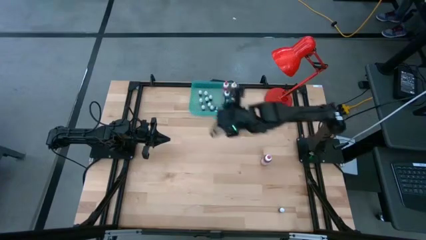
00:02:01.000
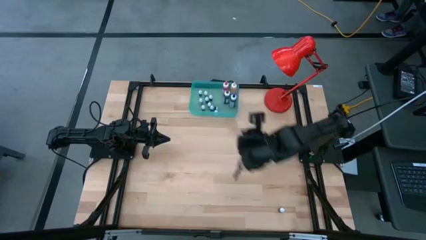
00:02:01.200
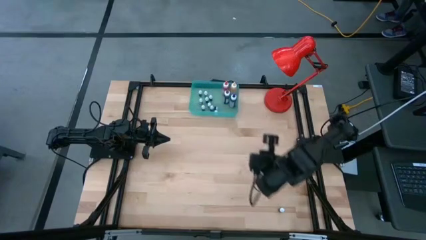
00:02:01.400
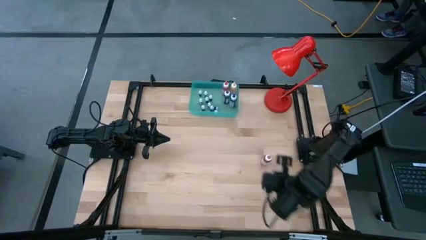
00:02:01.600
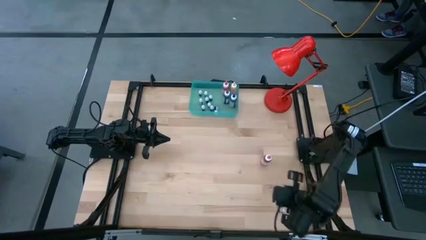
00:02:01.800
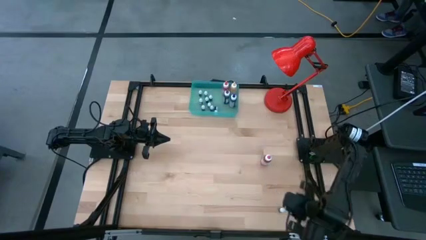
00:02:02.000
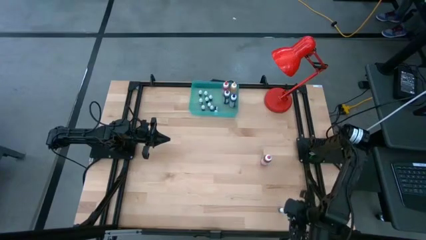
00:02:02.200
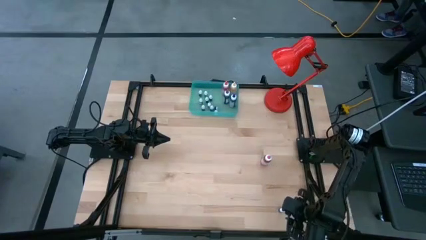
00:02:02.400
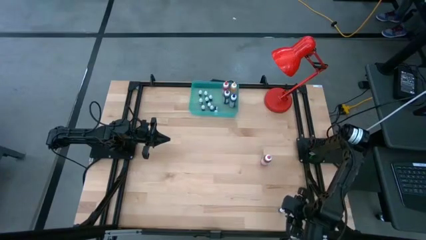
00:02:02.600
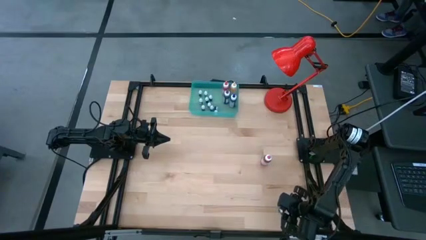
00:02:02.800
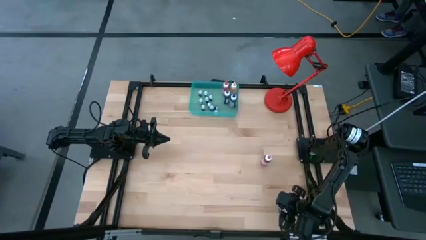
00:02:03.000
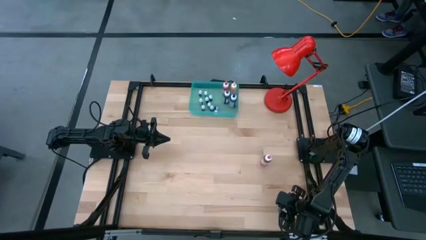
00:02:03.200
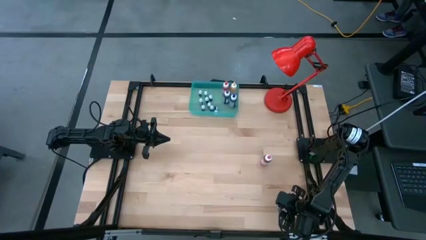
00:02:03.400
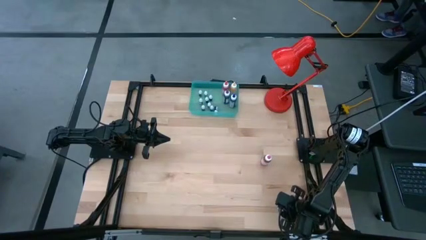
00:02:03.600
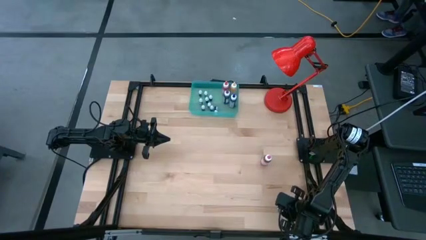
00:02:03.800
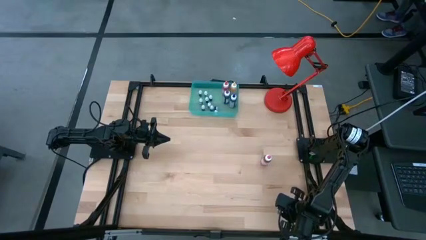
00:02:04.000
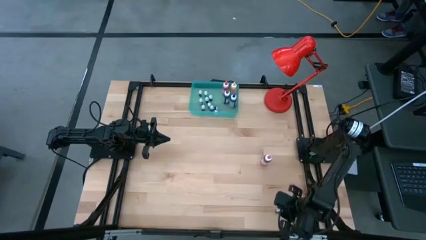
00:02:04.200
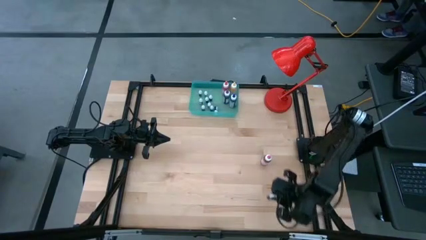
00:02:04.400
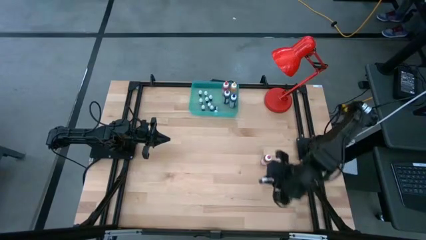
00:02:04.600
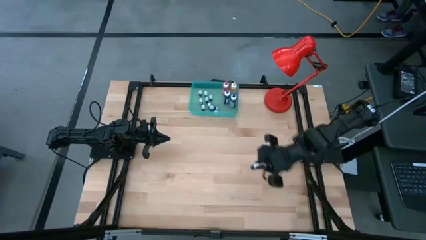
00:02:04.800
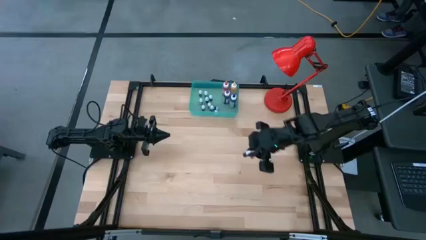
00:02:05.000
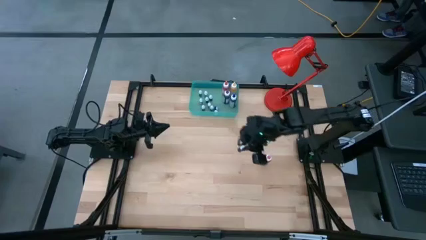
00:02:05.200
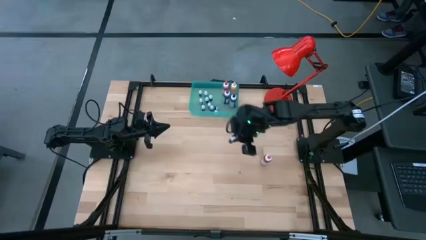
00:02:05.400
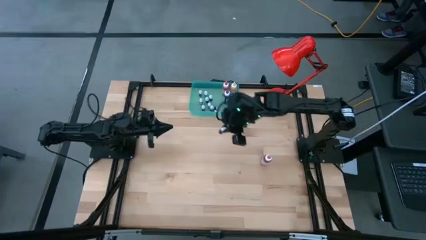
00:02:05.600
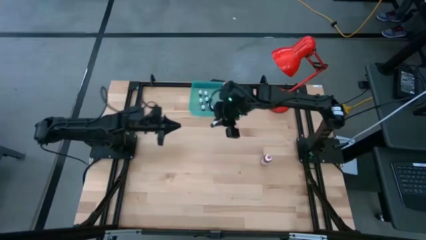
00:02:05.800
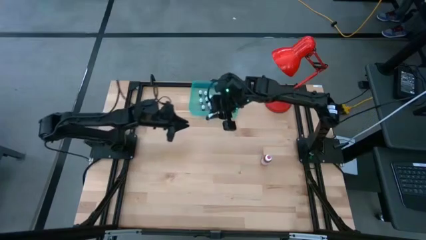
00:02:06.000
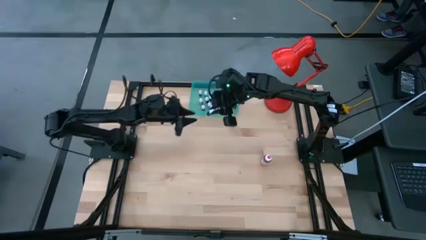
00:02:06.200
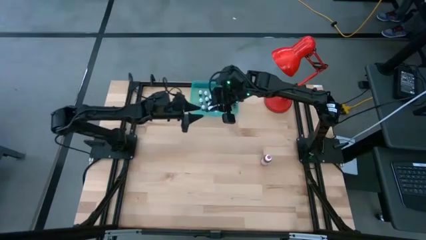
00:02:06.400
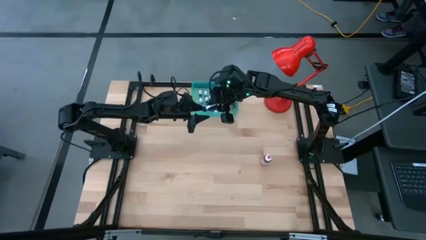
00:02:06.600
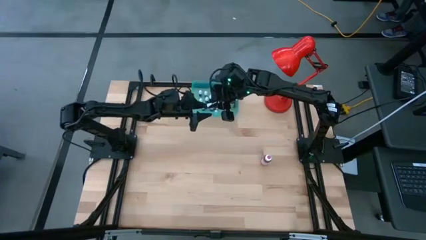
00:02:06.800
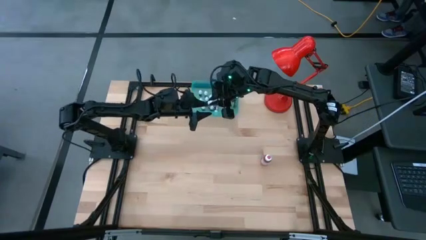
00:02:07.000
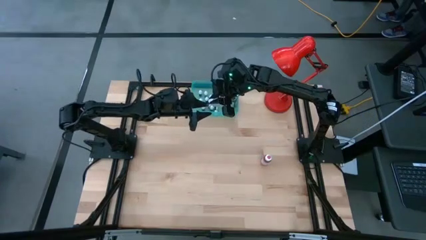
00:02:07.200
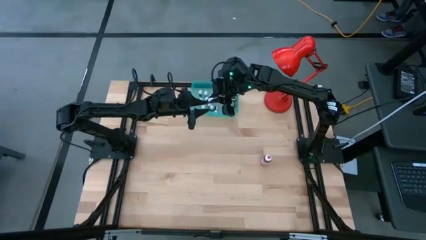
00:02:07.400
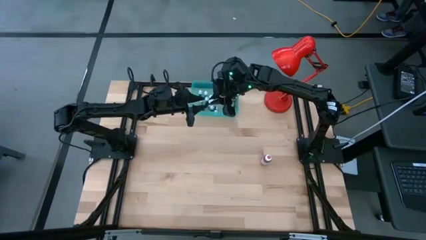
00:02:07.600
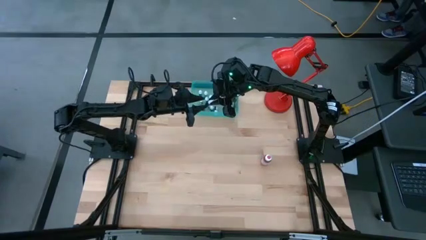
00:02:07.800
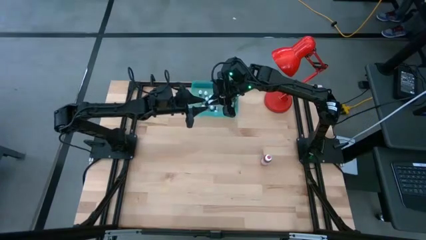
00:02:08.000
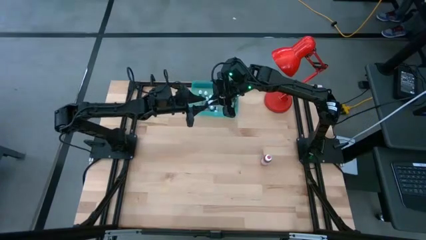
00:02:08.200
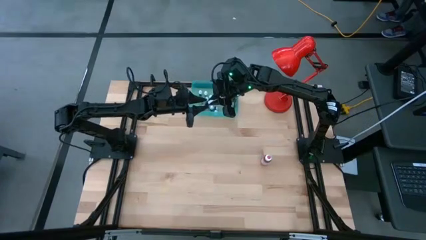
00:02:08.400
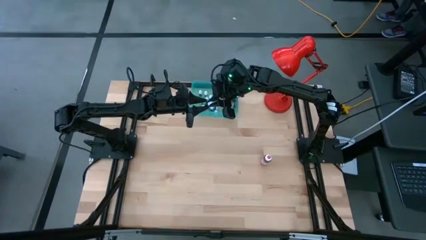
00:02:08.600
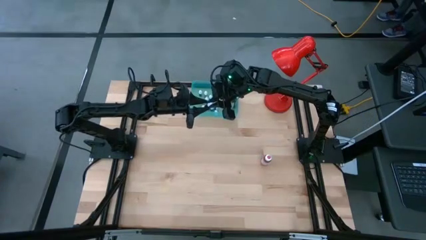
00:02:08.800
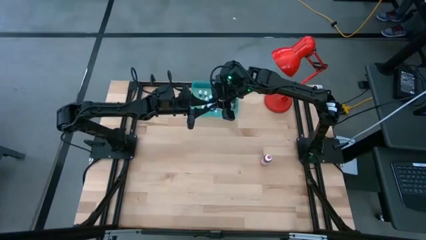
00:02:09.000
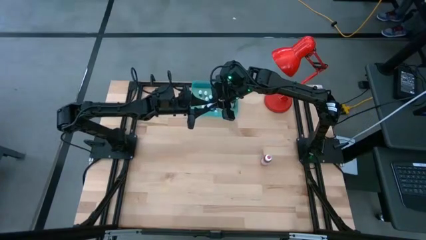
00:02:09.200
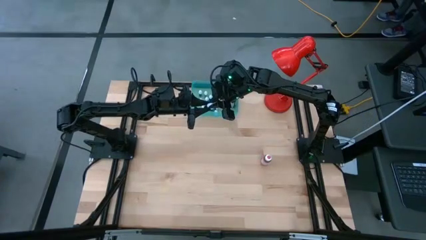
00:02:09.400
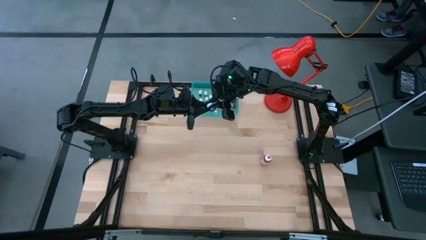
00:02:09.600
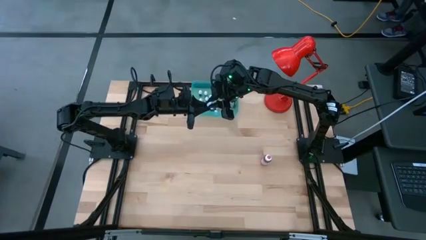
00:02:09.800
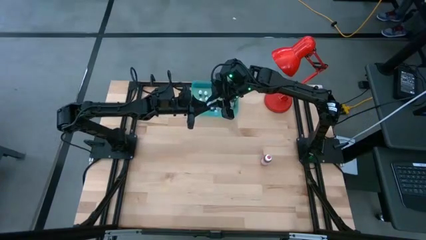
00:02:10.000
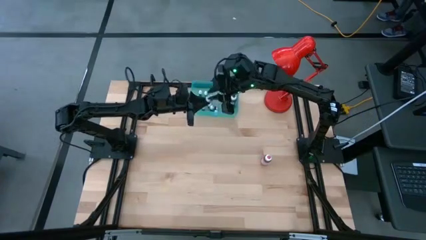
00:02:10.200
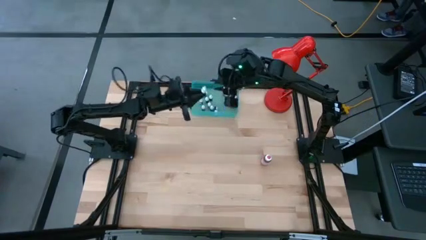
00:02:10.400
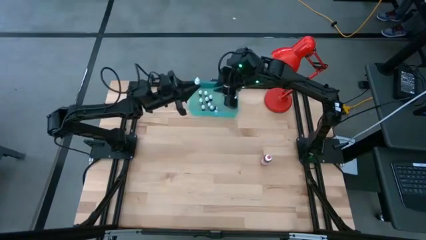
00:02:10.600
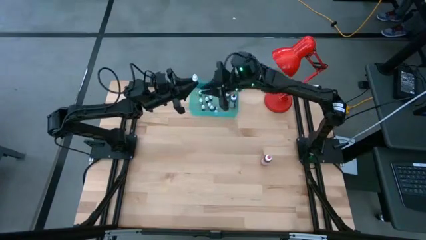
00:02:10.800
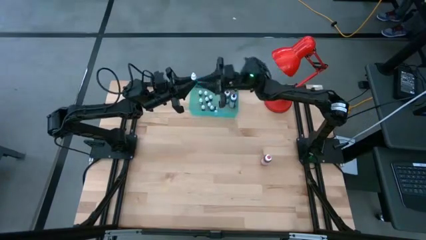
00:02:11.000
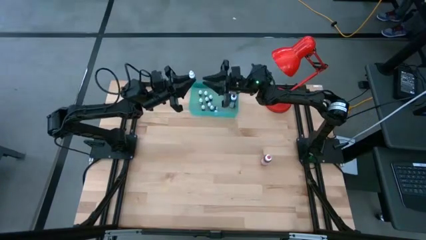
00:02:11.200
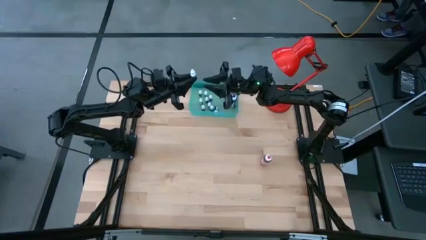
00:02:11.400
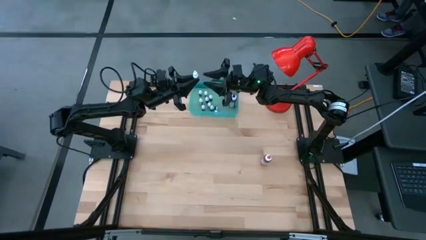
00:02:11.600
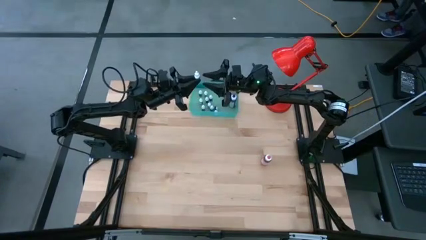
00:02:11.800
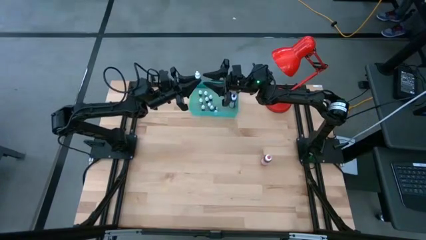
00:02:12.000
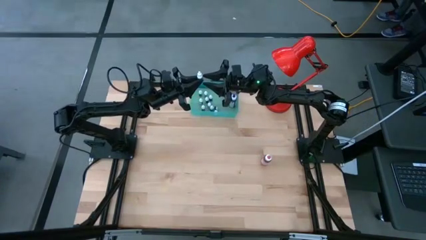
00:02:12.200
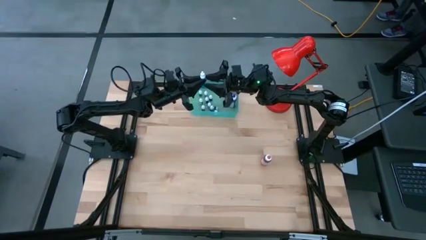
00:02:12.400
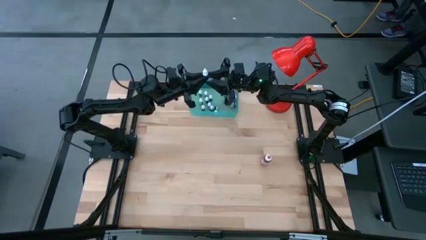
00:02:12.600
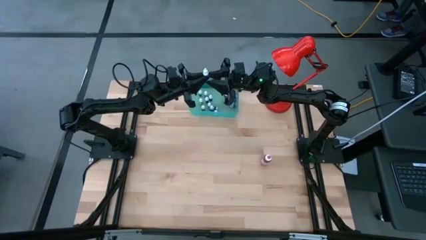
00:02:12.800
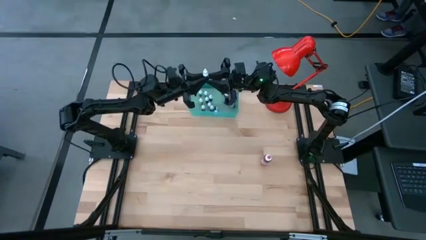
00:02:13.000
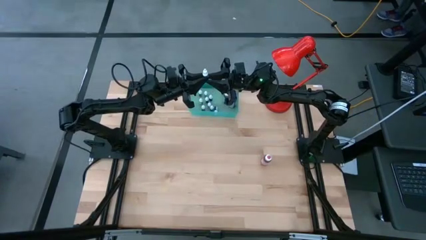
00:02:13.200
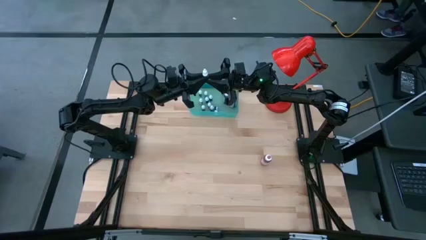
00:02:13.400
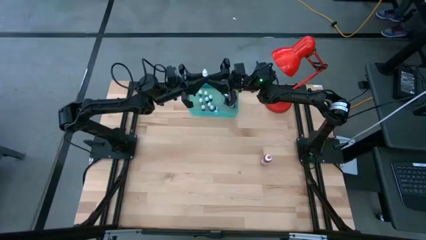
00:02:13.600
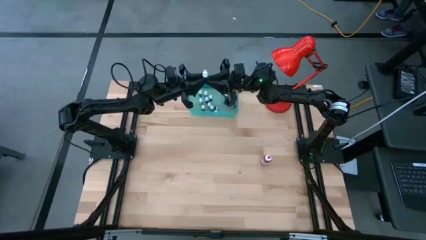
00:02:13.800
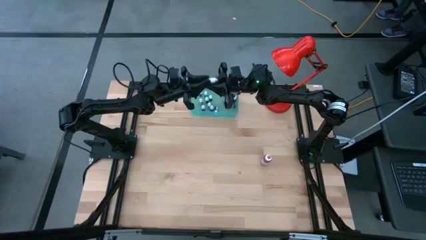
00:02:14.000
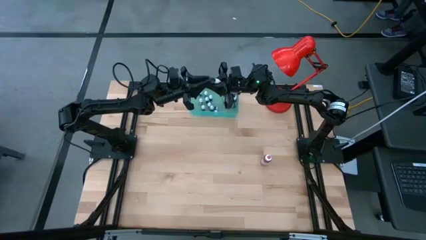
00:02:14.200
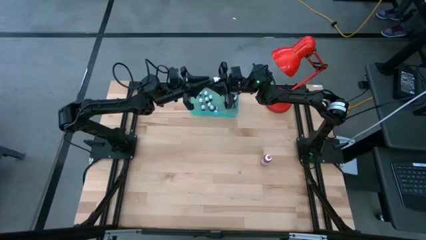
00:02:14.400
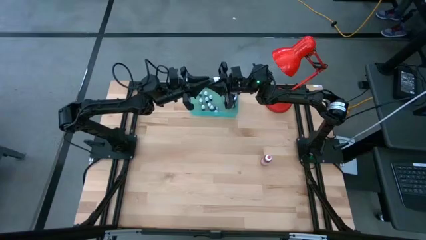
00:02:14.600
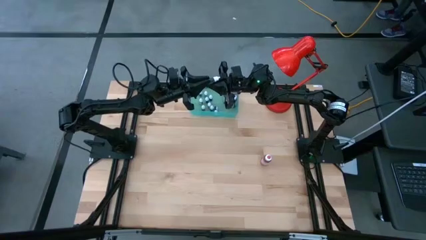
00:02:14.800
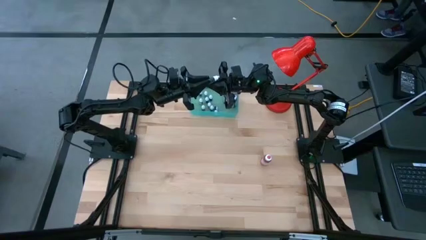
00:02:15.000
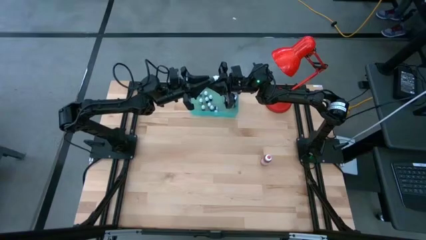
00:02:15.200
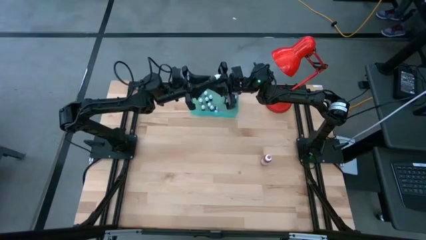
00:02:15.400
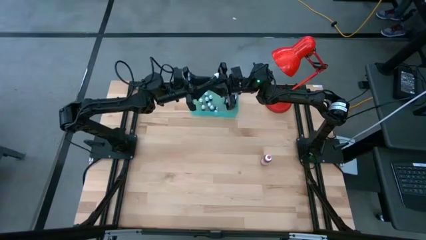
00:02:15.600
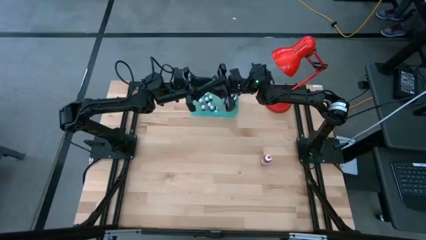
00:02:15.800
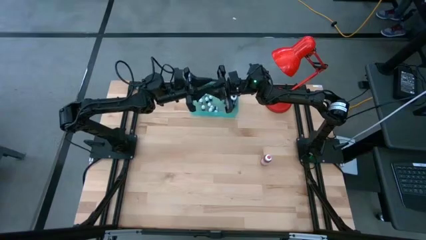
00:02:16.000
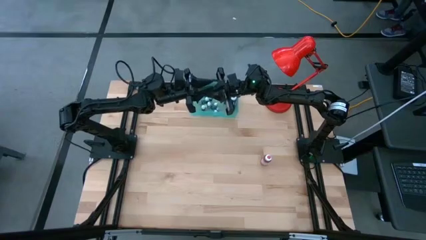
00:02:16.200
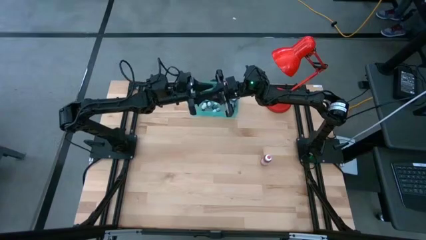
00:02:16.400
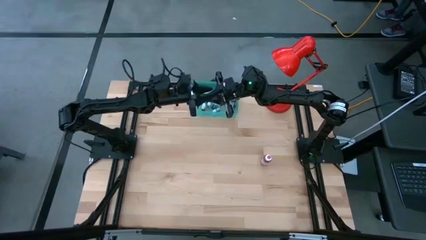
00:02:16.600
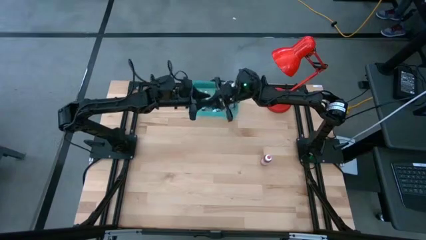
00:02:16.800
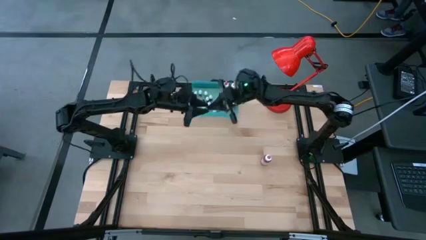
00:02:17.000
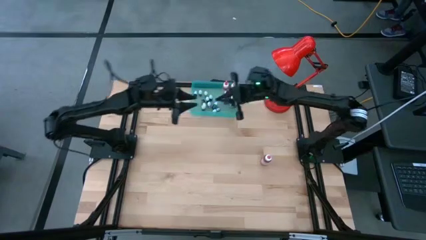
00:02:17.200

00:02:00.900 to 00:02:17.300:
Task: Pick & Place food coloring
Put the black food coloring bottle into the bin
